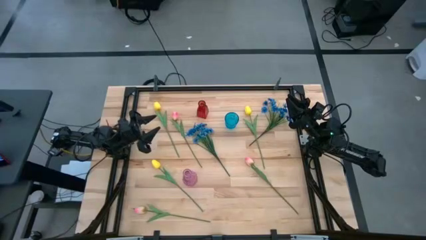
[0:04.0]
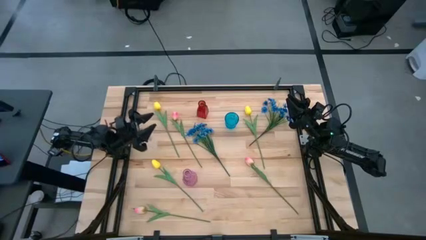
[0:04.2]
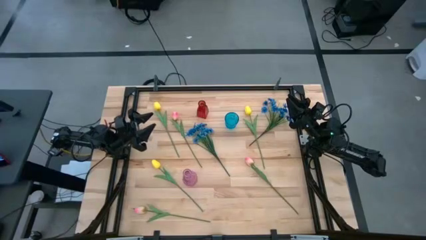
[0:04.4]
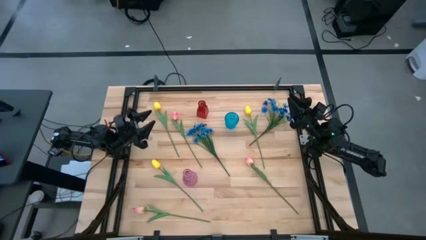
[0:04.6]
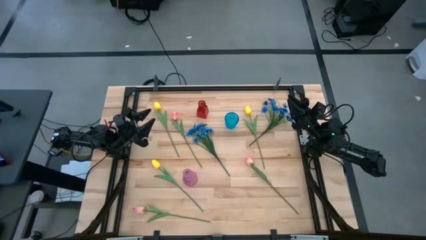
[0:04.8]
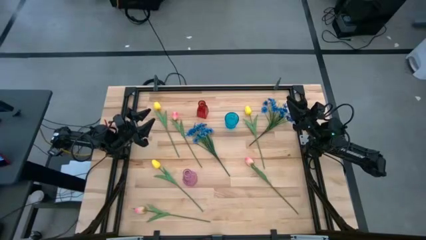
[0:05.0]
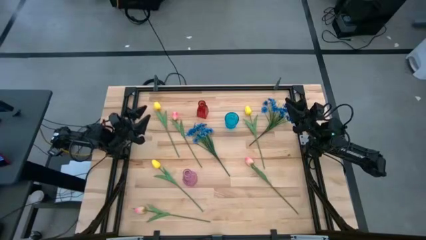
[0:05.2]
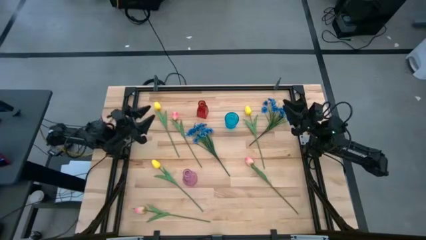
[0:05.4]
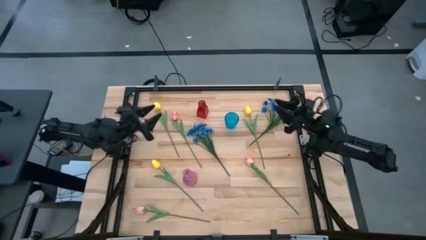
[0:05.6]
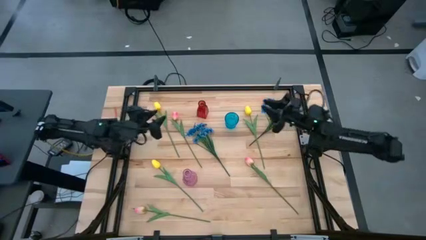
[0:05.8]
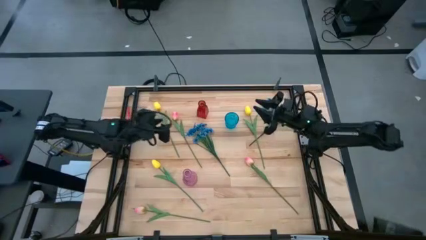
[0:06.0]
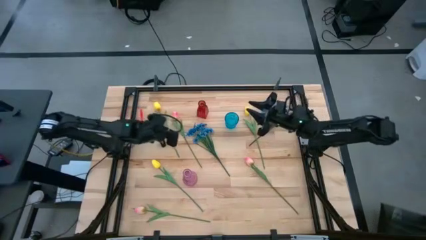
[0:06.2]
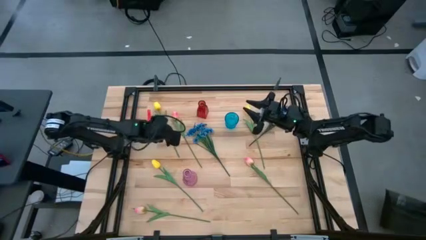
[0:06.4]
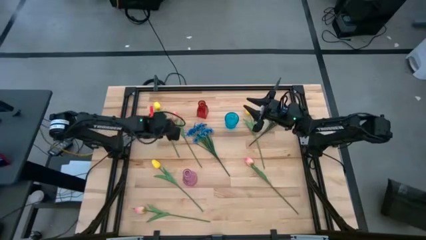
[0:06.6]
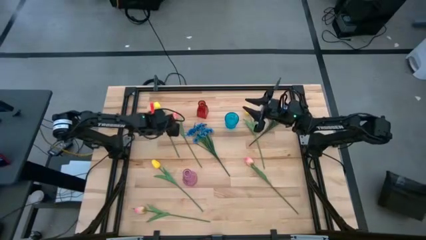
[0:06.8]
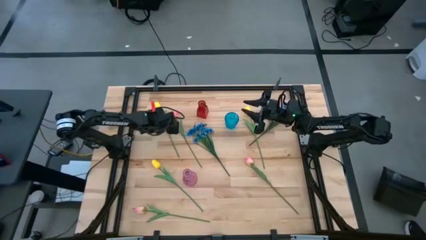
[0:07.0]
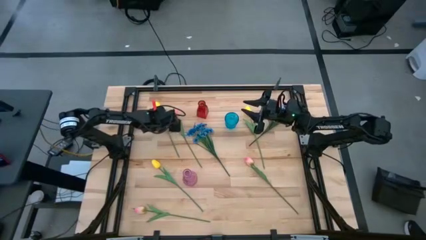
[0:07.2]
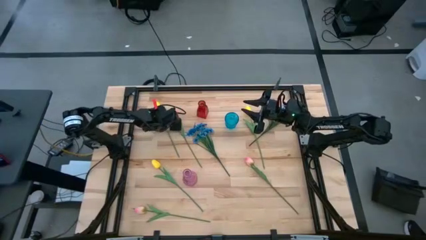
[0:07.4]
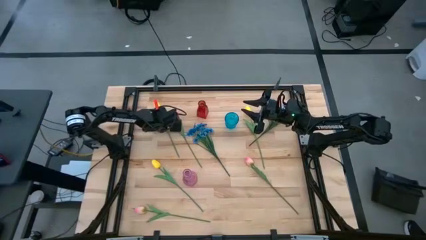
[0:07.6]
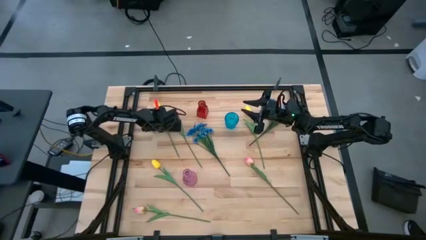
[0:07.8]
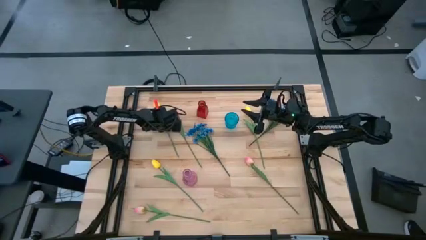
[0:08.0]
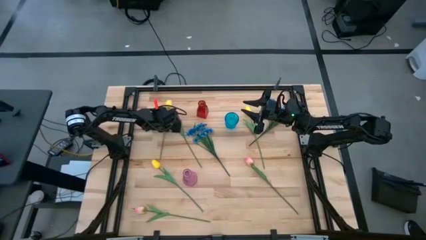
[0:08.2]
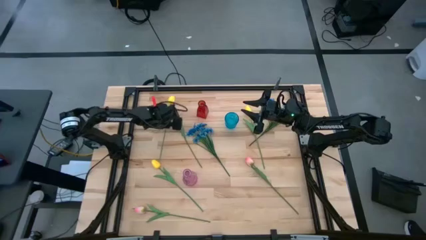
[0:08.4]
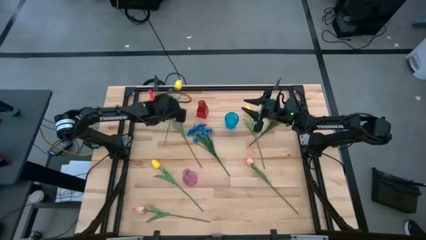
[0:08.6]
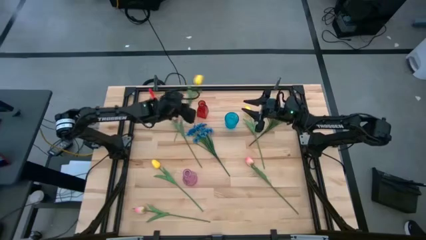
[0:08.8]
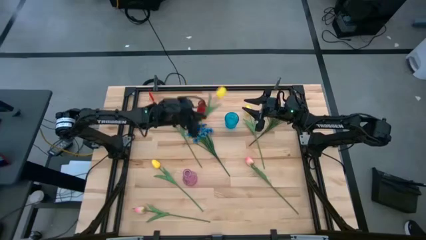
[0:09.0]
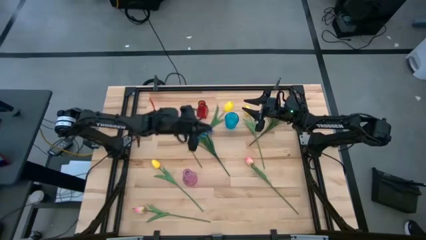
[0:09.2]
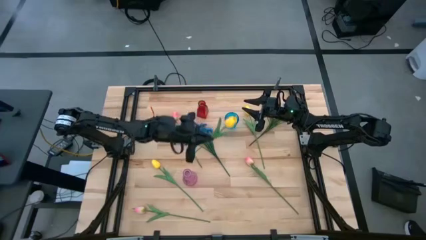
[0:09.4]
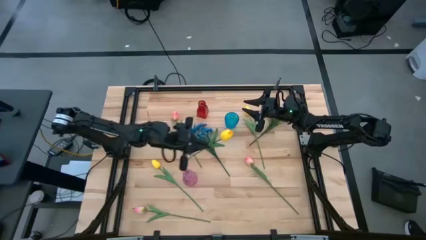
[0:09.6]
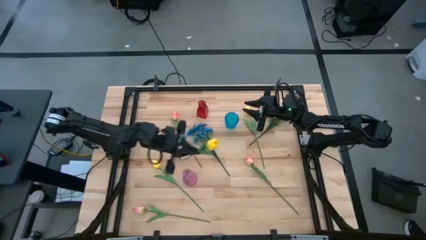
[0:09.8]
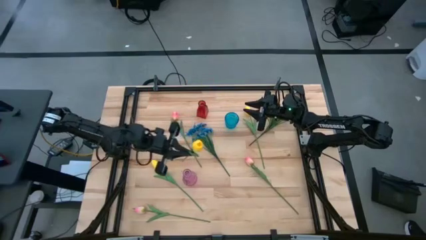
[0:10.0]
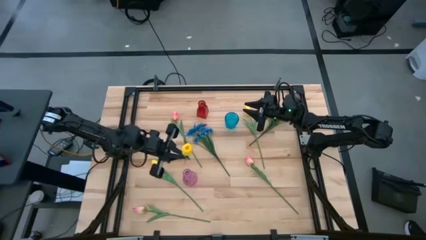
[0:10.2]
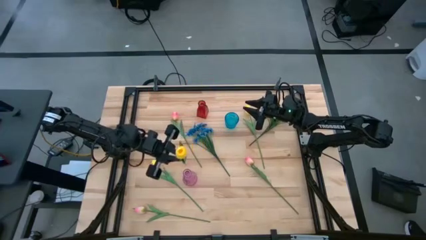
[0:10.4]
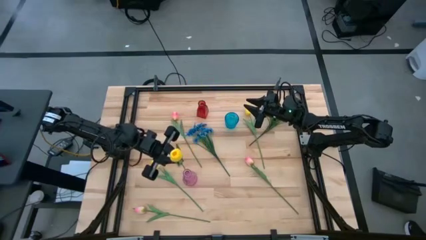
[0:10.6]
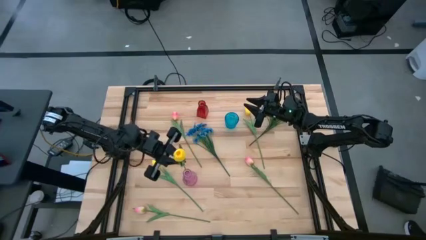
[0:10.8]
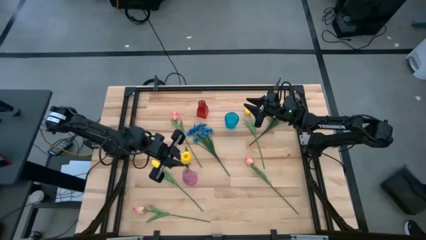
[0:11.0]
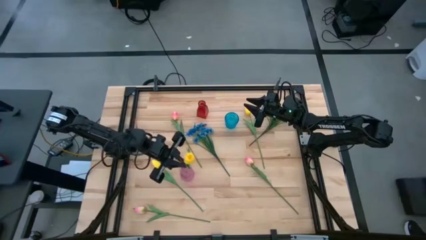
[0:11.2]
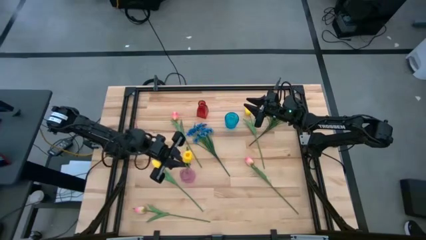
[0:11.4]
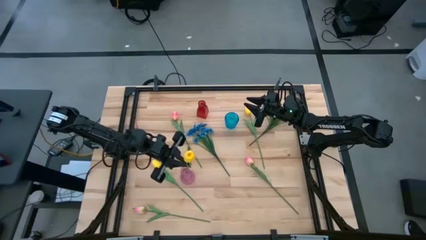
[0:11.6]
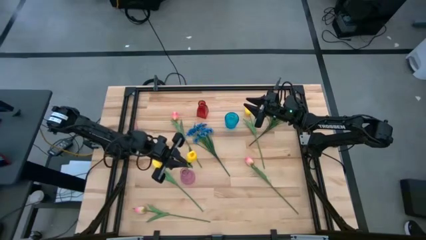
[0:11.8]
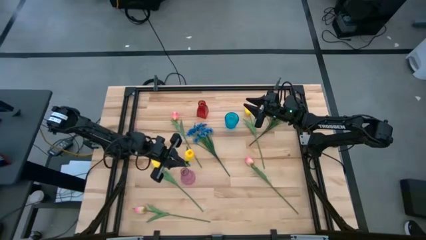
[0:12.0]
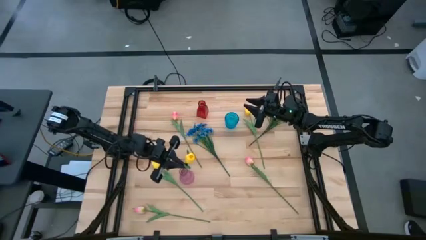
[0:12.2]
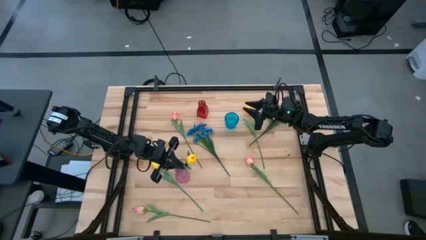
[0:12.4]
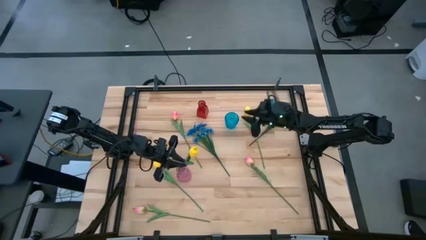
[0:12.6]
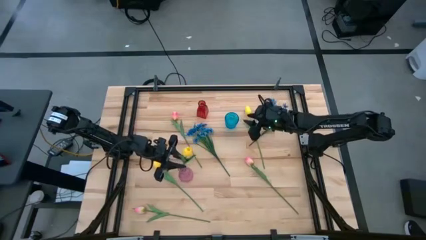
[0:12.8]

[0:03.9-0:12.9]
Task: Sort flowers into vase by color
Put the top left yellow tulip into the purple vase

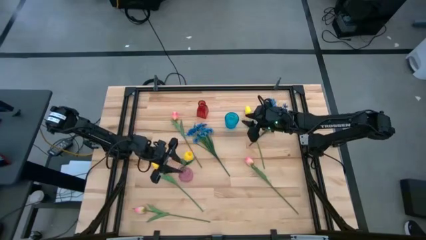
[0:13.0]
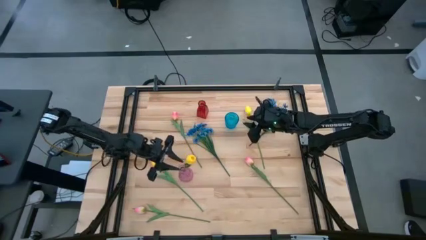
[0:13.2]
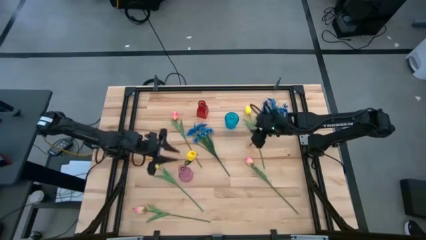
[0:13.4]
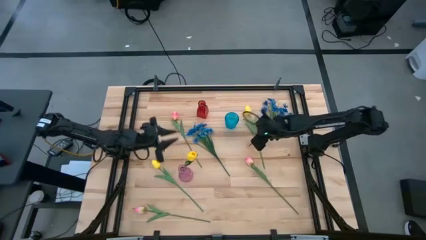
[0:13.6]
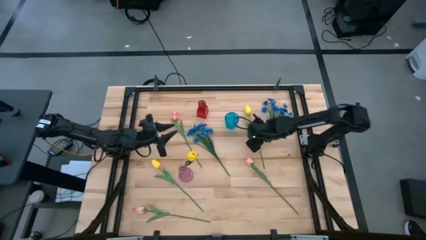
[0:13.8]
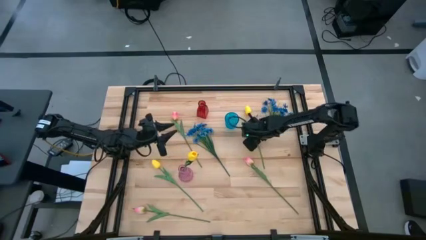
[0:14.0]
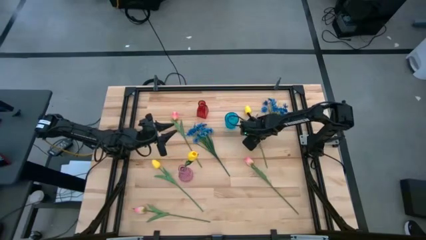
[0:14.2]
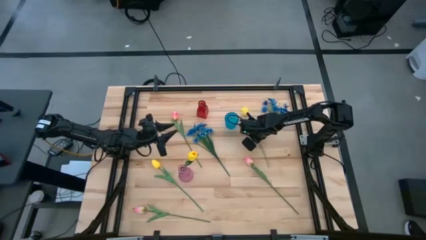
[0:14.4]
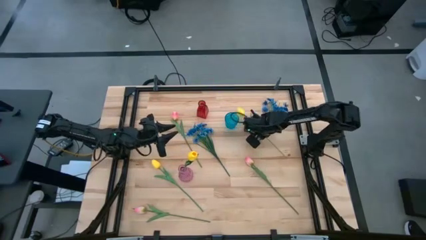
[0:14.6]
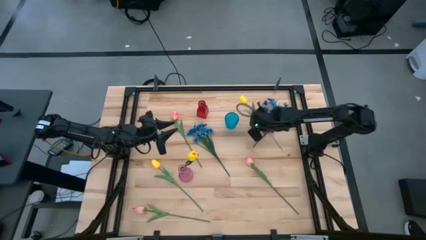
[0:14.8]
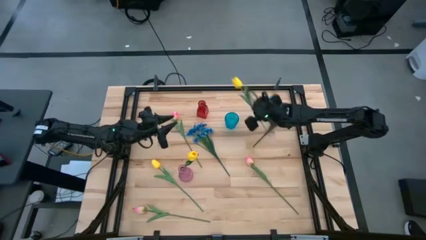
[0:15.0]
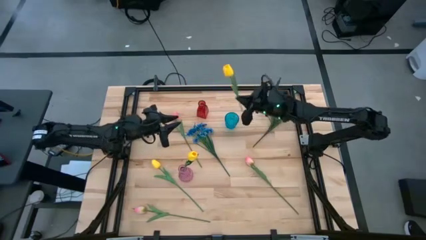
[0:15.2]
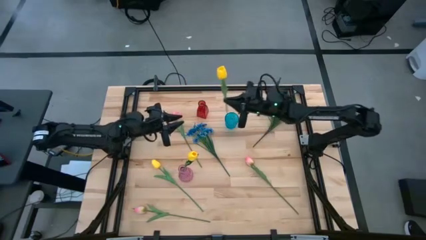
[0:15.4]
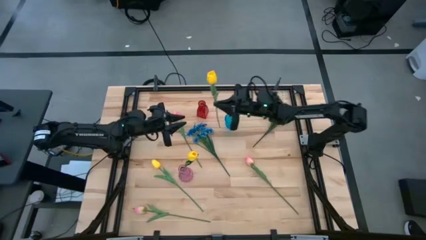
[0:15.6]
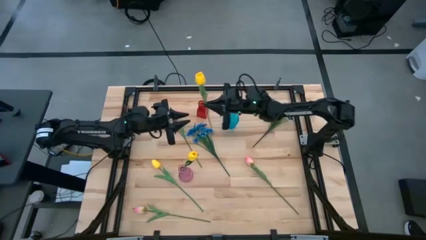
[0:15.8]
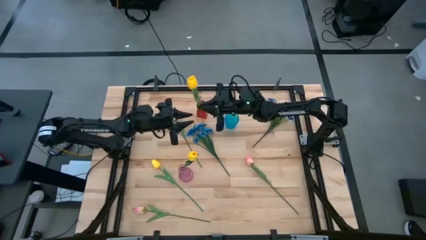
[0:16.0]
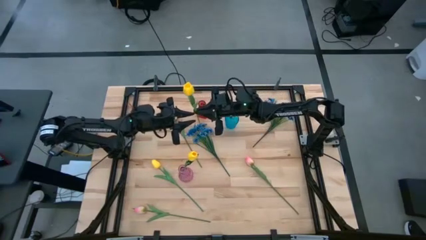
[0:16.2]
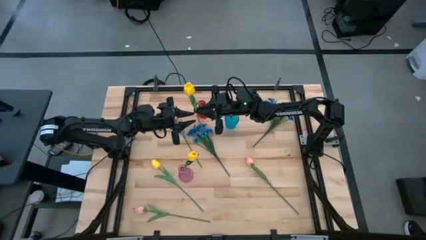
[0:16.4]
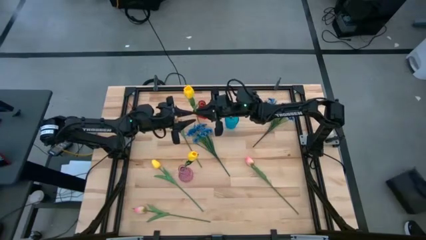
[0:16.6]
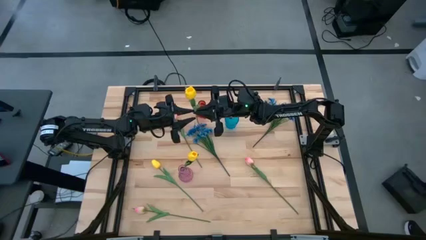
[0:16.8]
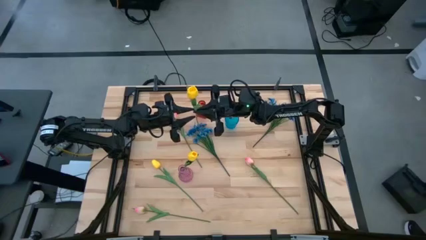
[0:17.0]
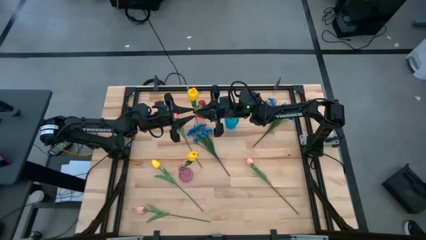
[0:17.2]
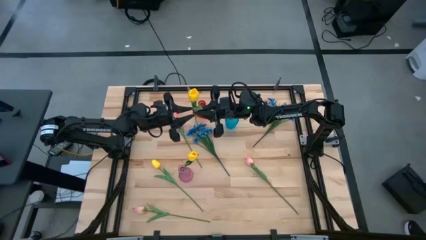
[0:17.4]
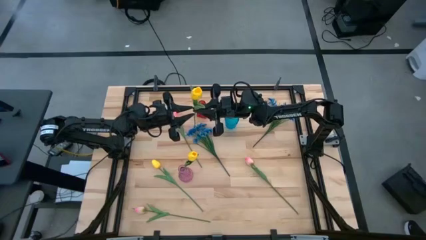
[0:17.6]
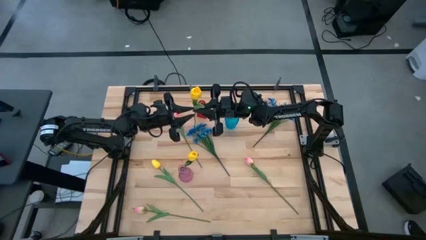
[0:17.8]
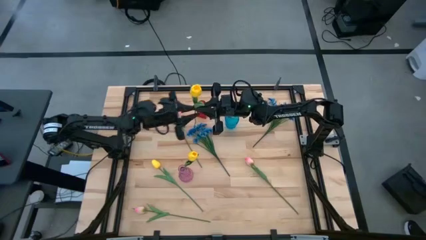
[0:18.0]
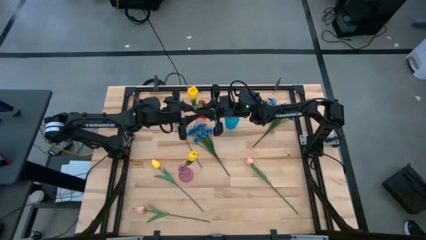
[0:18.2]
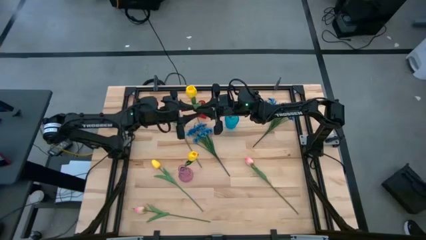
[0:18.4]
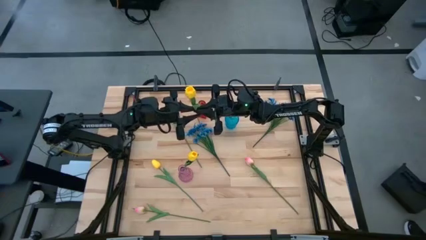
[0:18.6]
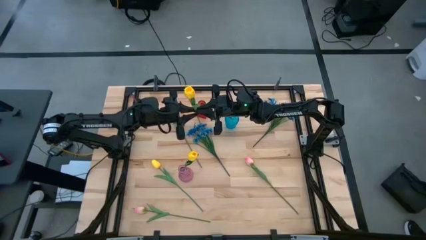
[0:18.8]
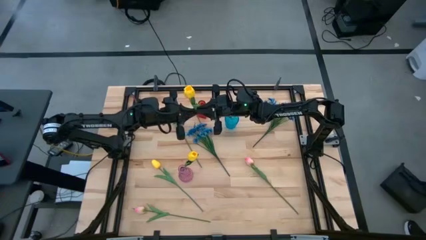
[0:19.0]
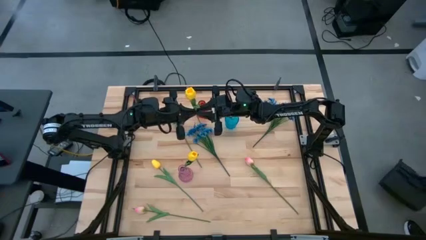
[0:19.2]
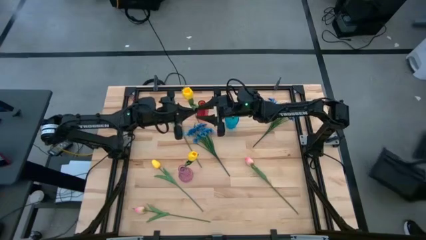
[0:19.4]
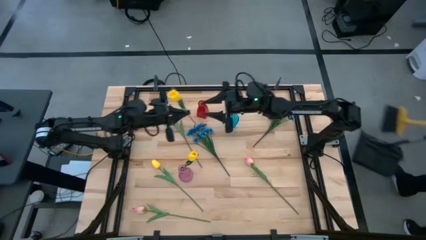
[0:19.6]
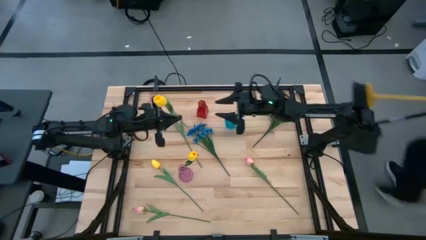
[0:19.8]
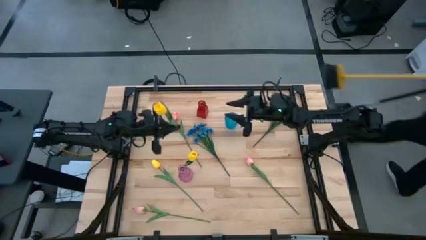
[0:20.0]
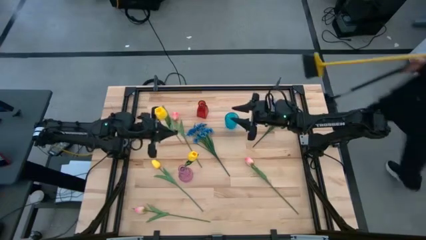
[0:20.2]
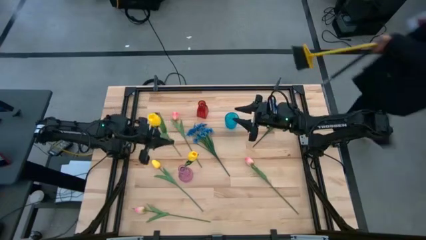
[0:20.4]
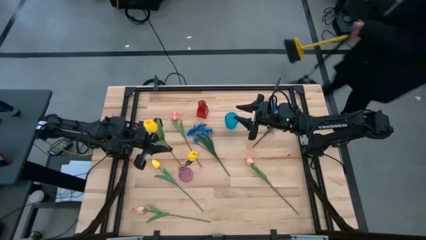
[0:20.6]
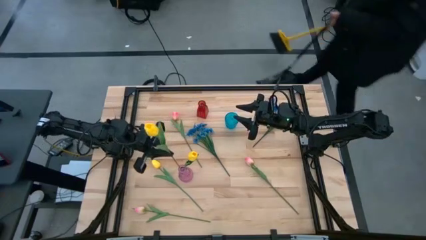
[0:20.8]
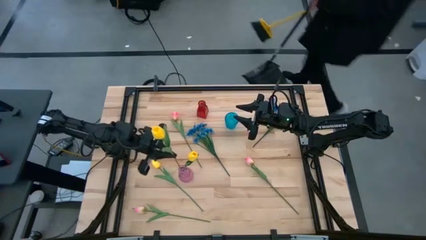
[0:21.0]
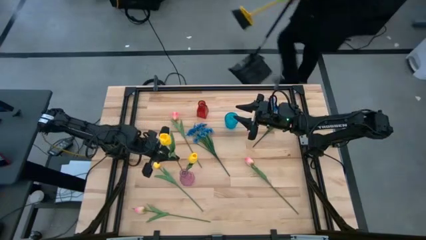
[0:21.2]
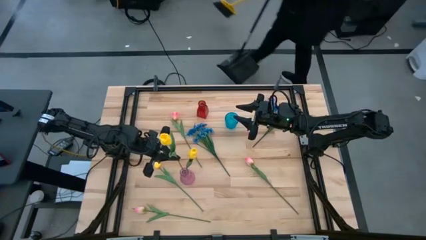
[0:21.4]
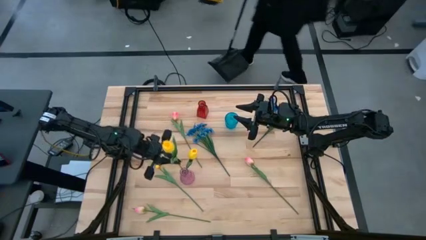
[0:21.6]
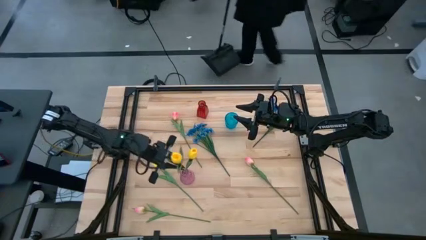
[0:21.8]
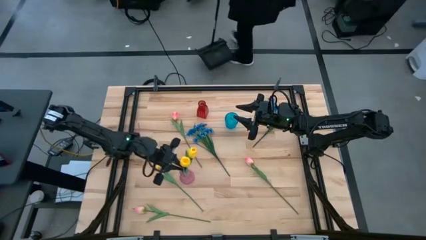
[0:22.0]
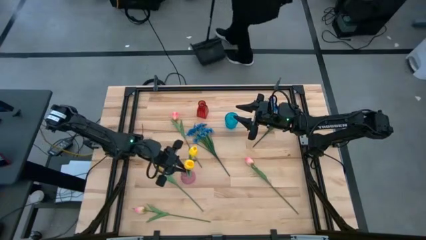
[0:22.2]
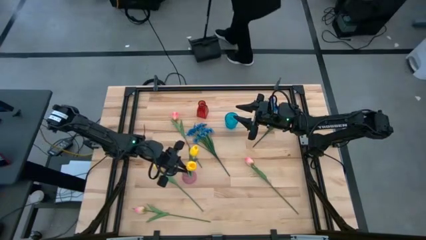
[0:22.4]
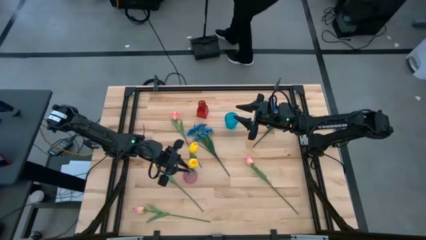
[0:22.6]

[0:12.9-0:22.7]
Put the top yellow tulip into the purple vase
